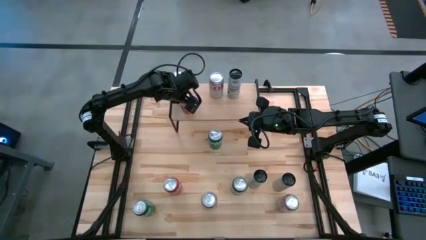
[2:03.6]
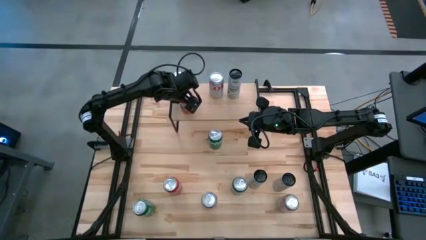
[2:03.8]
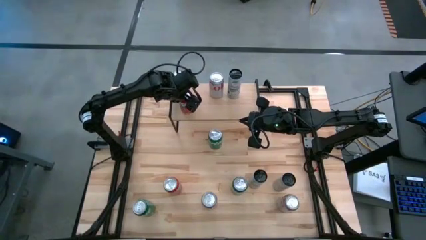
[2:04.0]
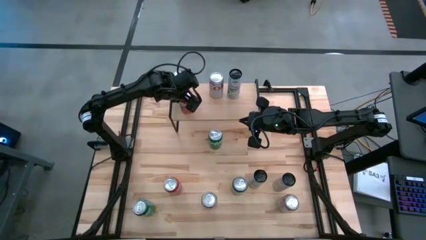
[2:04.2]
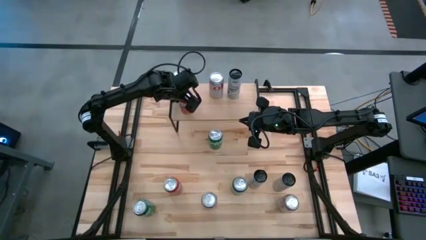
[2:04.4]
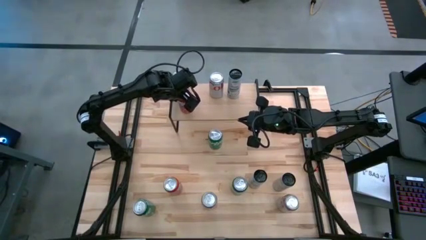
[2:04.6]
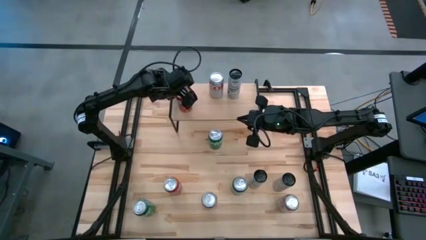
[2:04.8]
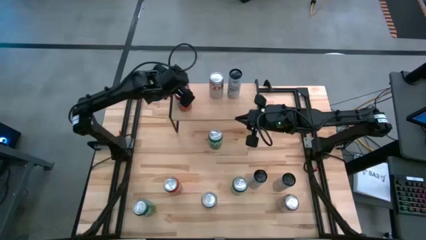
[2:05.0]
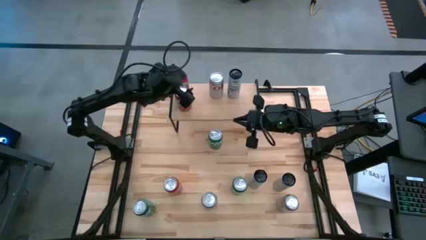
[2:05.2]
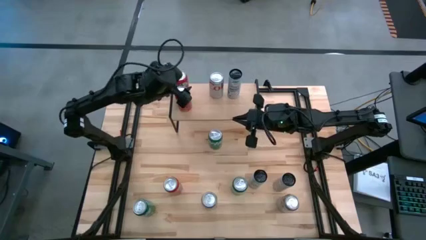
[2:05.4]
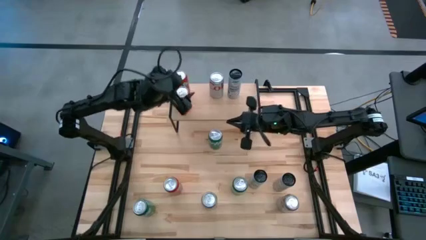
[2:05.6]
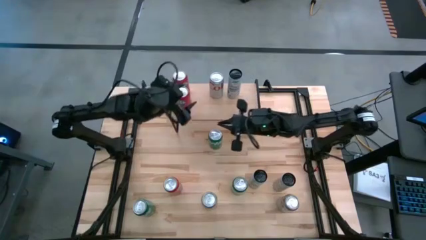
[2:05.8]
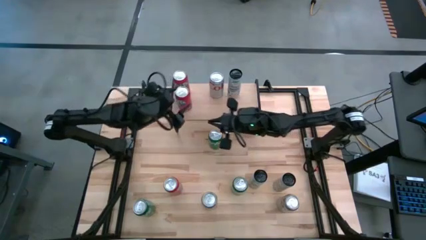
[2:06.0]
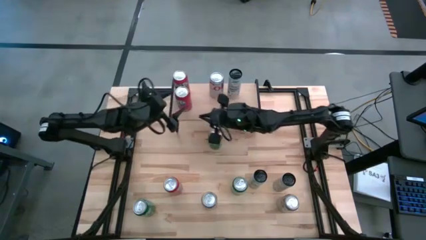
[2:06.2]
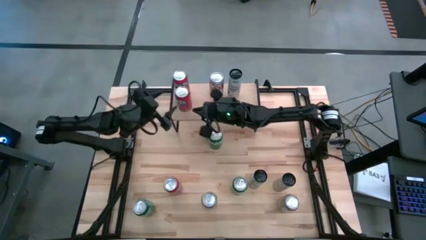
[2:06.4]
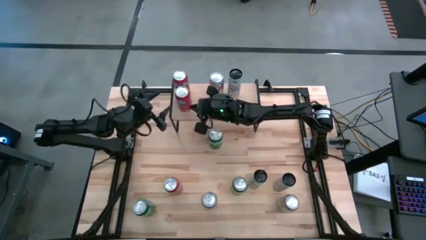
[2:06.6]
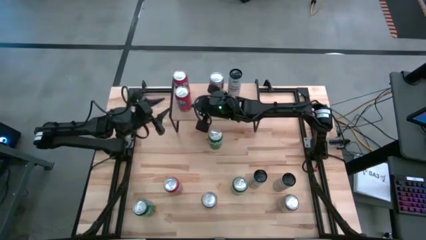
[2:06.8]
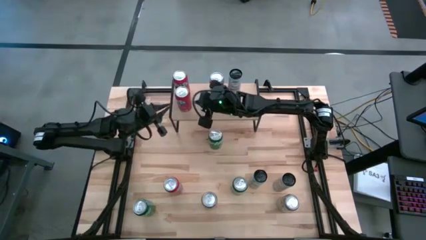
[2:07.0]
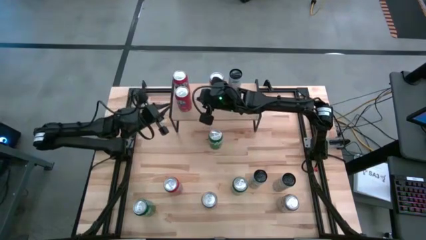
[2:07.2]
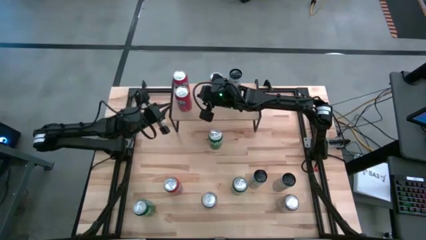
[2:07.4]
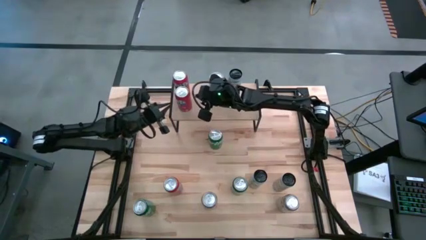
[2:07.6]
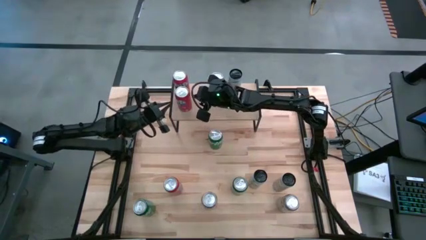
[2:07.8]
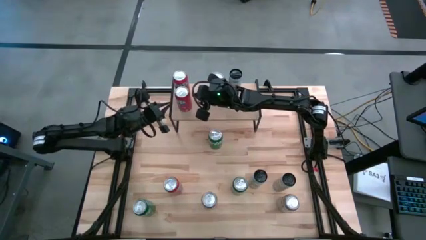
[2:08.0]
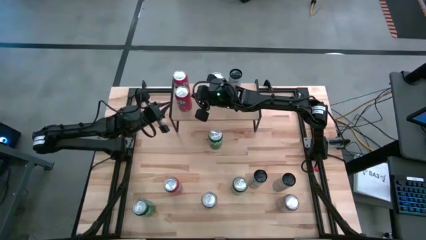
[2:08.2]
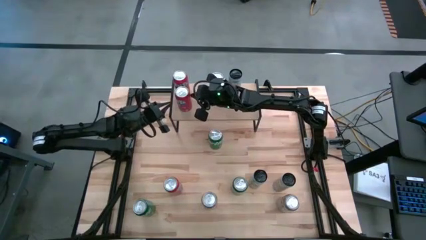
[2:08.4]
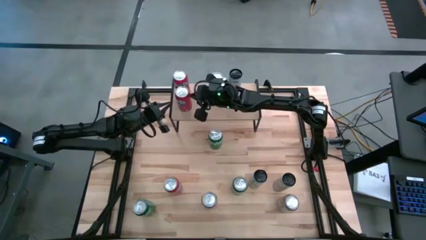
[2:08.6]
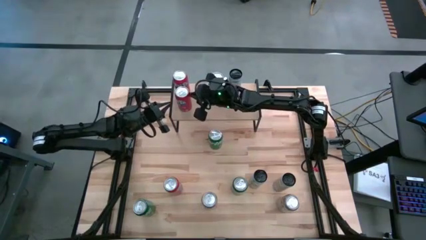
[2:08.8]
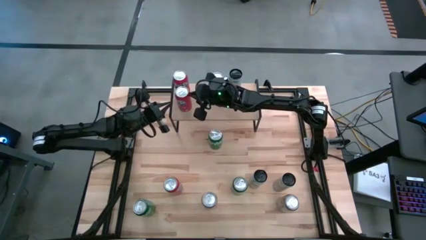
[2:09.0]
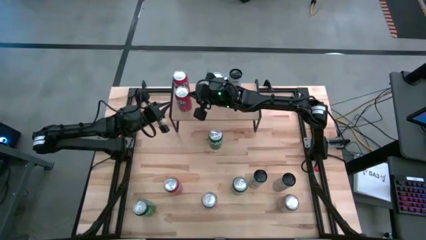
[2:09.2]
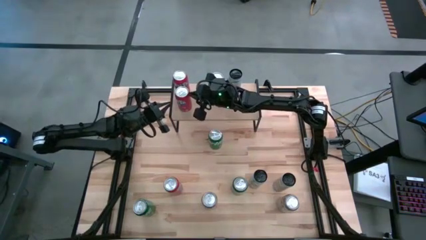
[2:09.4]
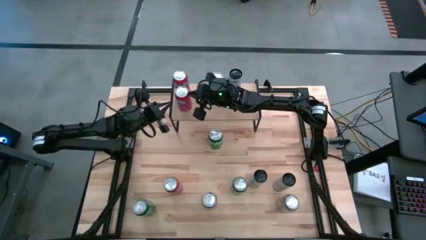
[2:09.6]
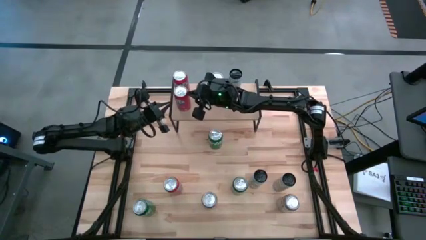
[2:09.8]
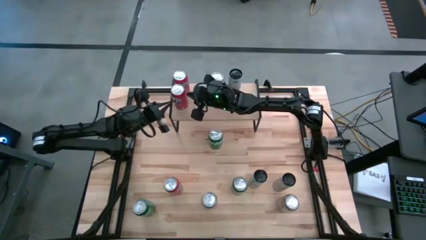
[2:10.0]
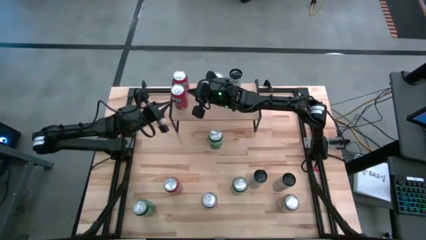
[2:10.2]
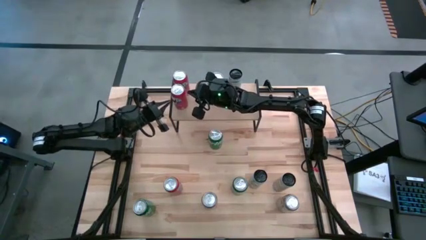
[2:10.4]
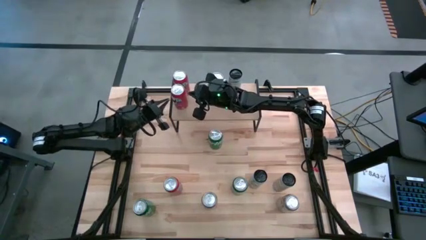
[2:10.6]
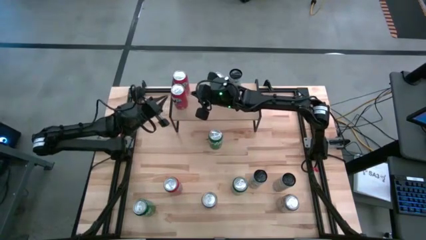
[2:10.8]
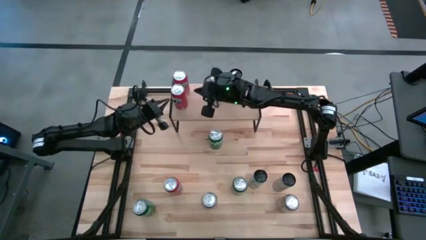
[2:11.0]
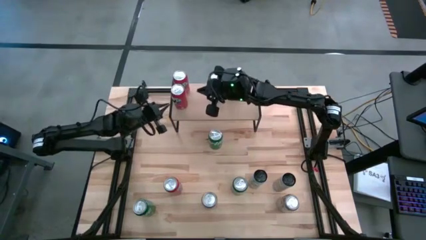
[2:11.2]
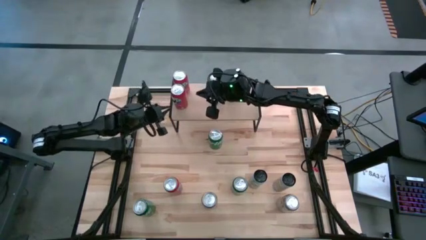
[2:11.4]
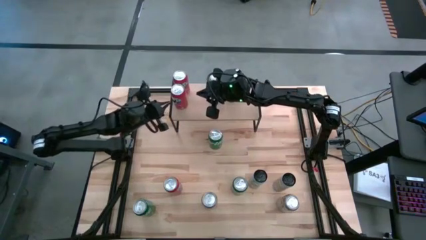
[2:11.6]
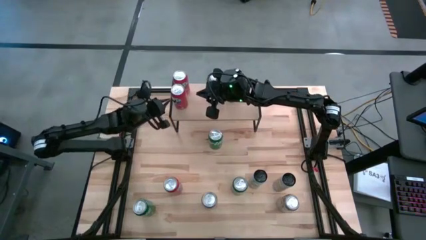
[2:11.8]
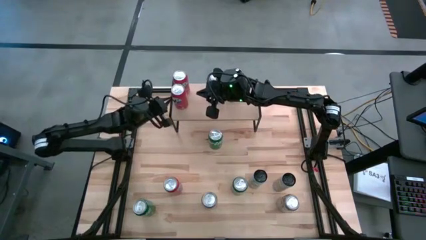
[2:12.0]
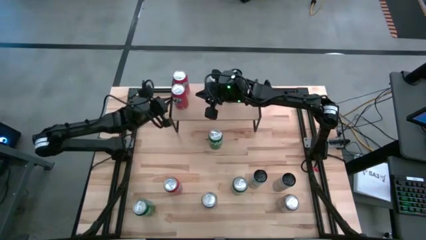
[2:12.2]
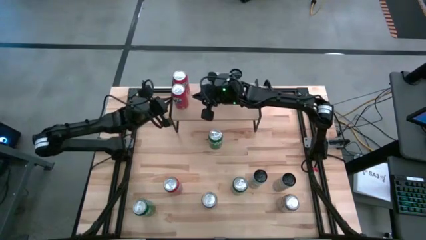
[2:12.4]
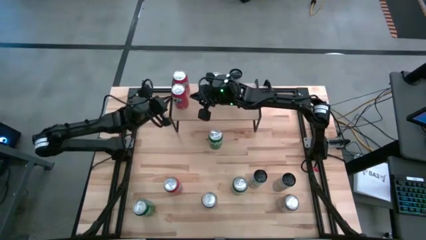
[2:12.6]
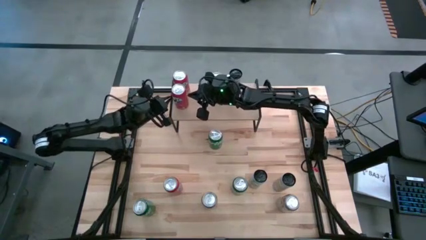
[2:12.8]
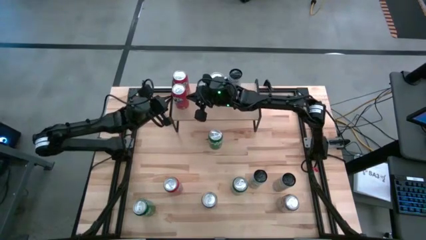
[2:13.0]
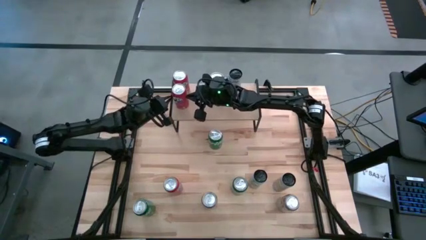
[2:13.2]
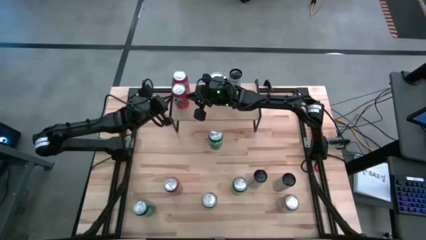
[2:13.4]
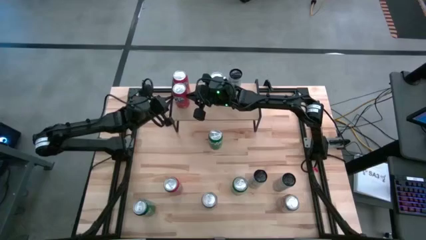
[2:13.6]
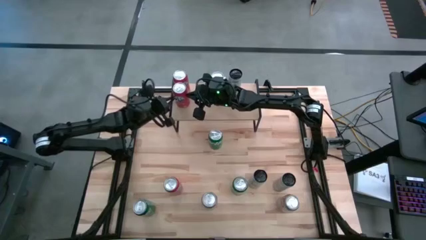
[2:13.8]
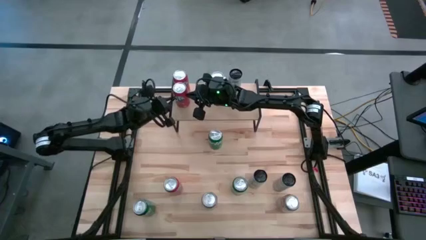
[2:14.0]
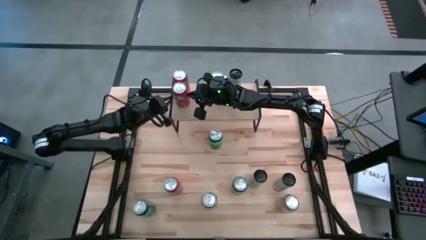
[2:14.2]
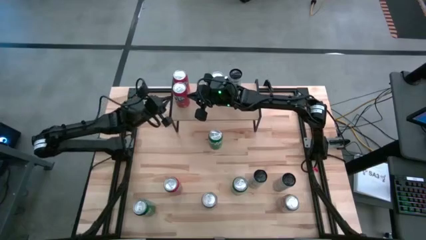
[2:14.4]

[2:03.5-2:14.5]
Task: Place canned beverage on shelf
Put the top orange soda can on the shelf aligned with the other orange soda can

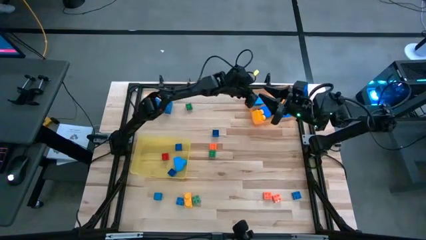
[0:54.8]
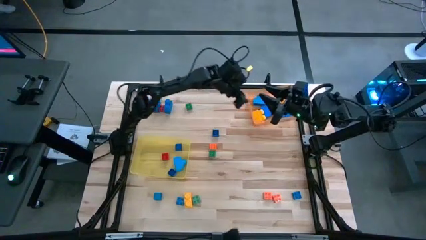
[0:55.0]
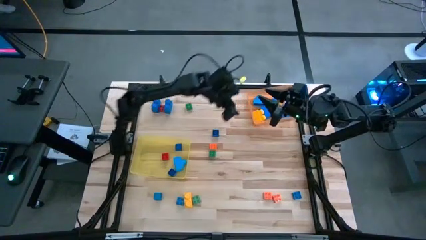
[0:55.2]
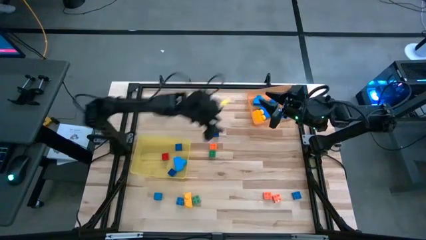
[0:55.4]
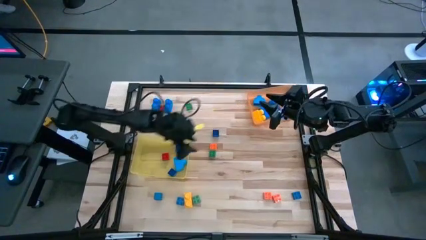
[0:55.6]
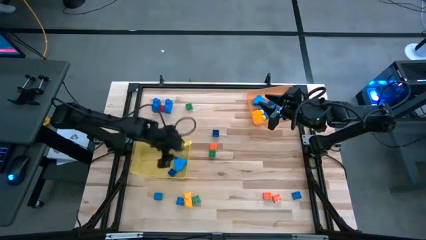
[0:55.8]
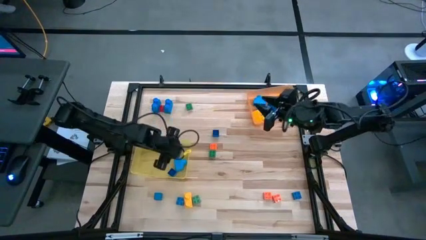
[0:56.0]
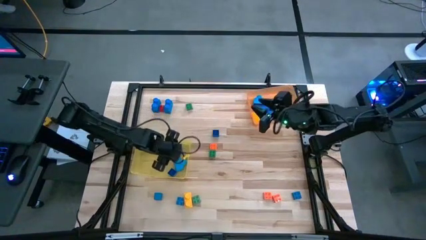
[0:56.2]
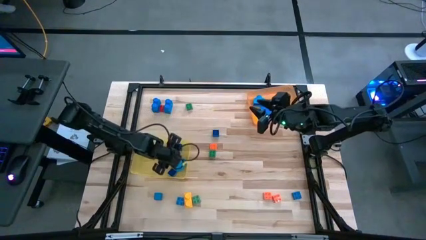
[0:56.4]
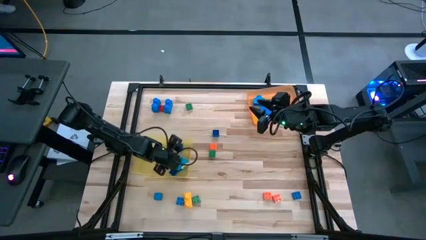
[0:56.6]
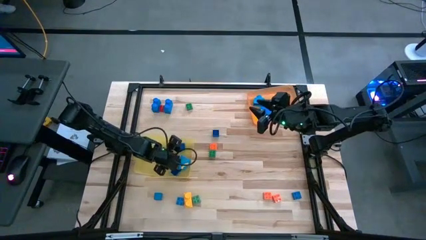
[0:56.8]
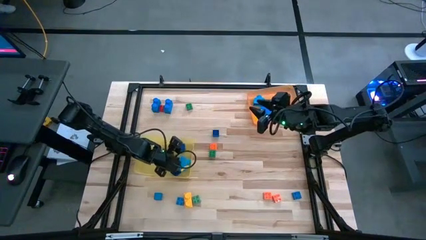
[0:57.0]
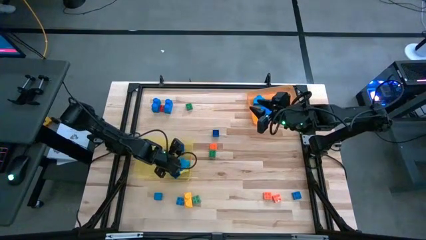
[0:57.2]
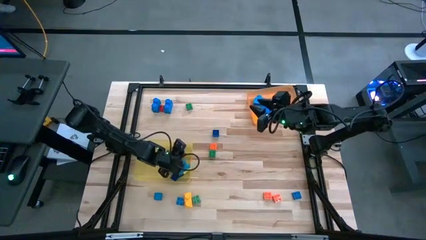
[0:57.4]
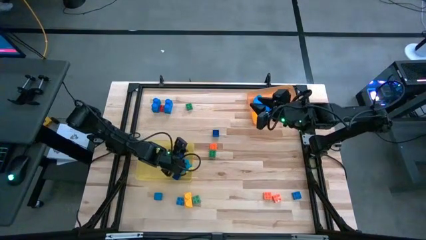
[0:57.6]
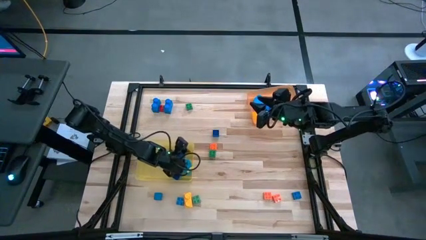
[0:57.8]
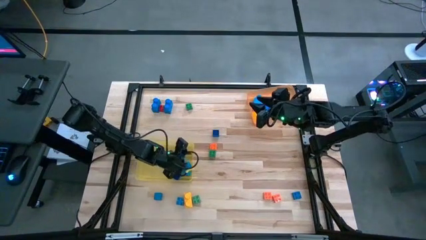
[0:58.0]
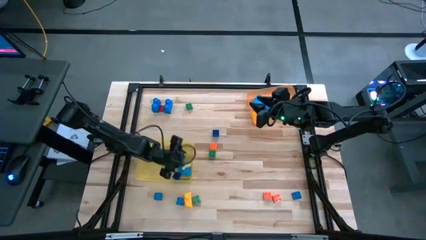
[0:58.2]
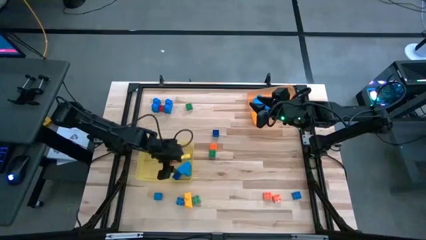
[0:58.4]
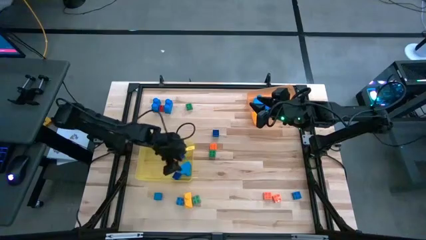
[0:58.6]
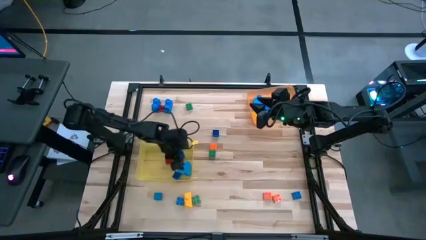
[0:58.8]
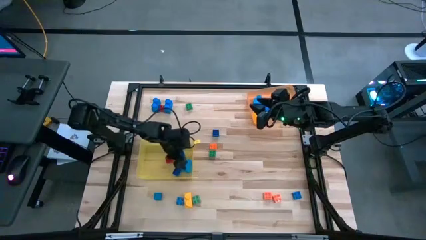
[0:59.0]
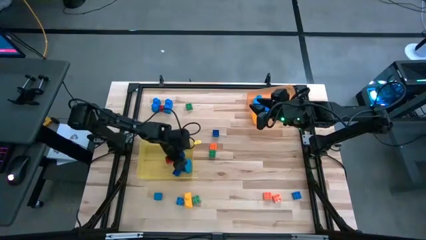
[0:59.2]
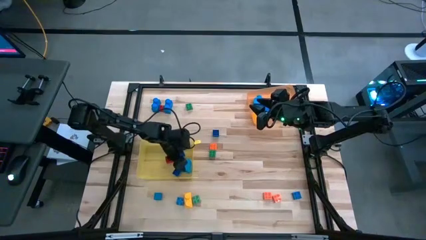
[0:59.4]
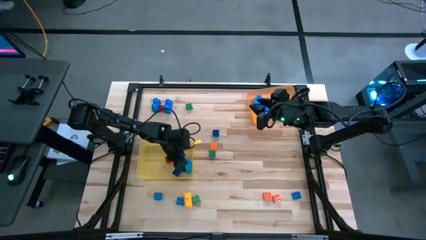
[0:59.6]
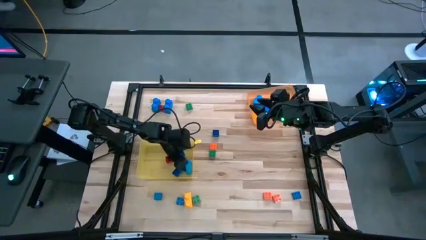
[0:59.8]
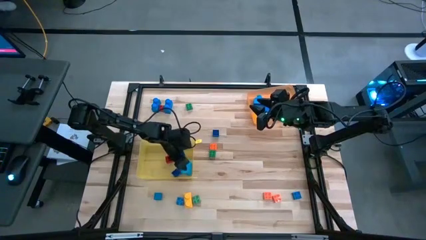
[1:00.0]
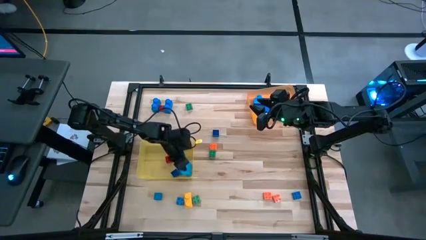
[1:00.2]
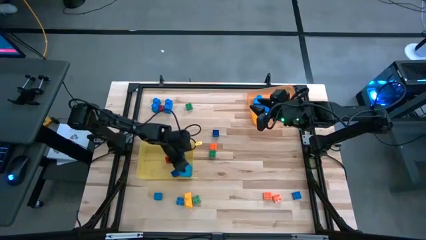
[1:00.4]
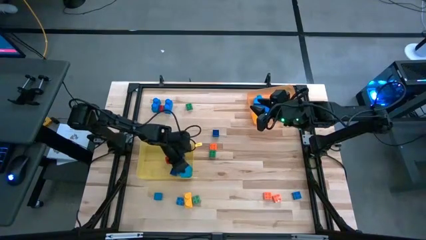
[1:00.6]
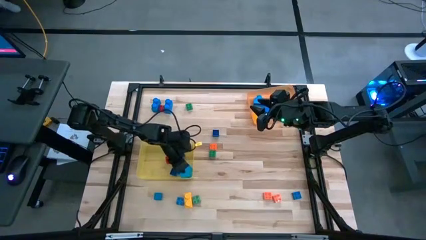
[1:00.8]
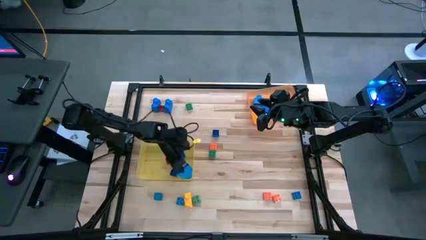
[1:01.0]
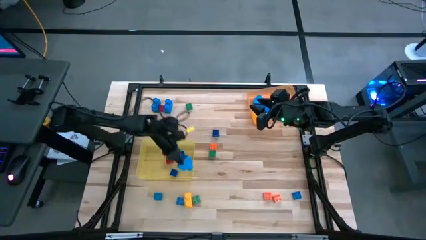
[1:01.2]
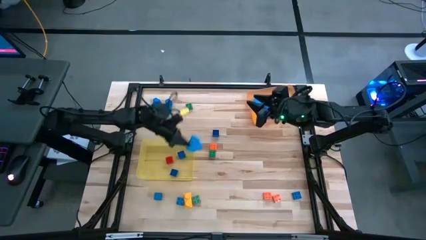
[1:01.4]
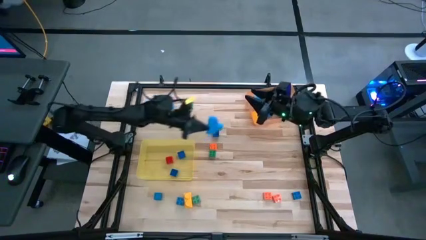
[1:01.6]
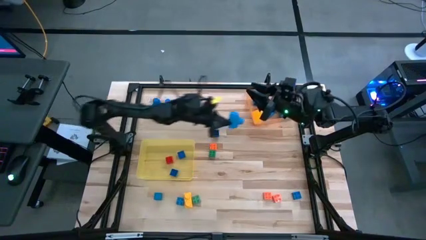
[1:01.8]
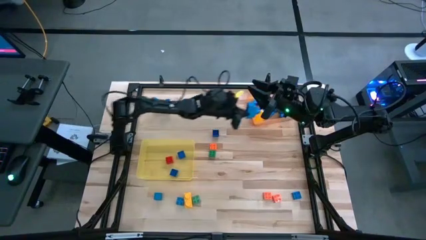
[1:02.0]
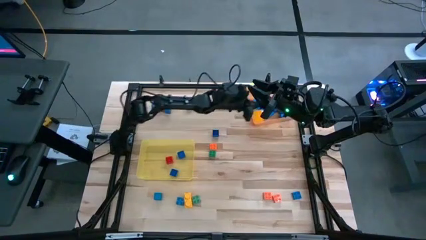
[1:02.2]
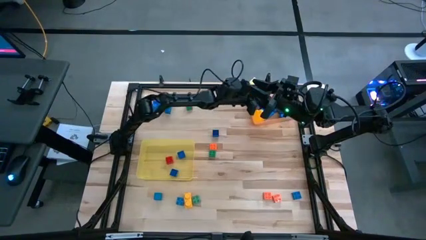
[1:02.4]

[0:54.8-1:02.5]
Task: Sort blocks by size
Put the large blue 1 stud game piece into the orange bin
